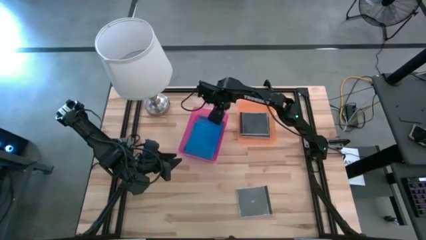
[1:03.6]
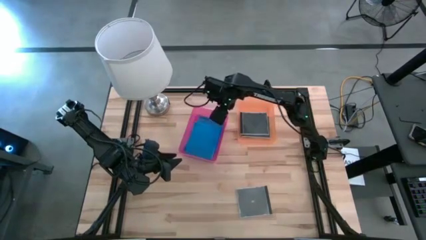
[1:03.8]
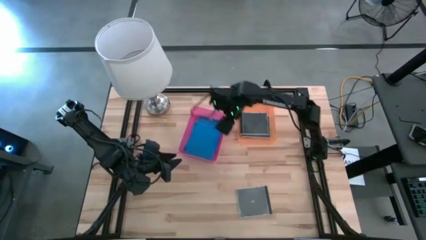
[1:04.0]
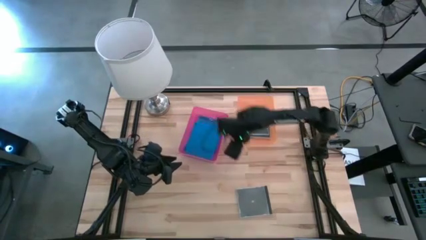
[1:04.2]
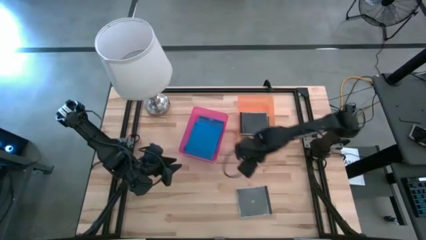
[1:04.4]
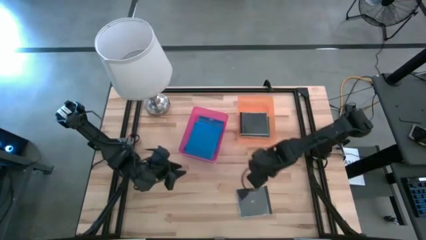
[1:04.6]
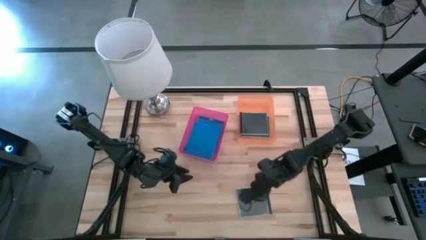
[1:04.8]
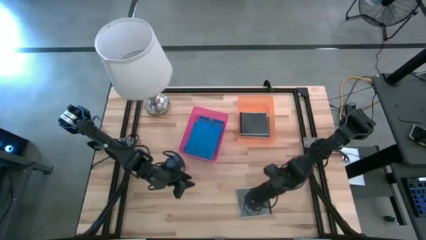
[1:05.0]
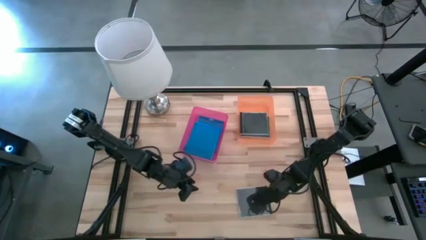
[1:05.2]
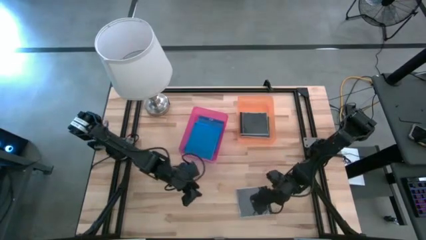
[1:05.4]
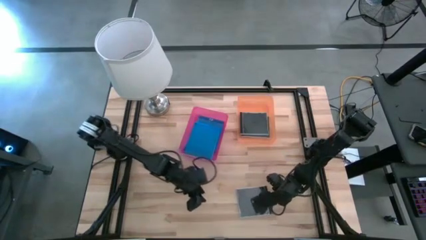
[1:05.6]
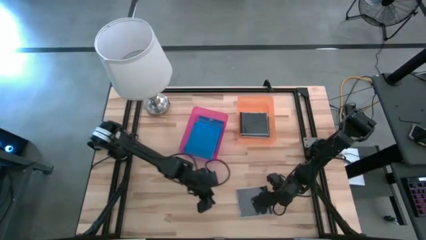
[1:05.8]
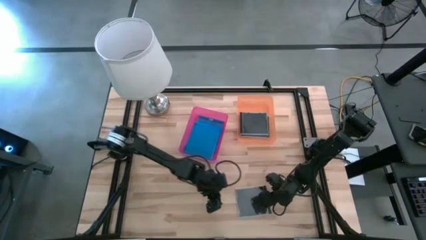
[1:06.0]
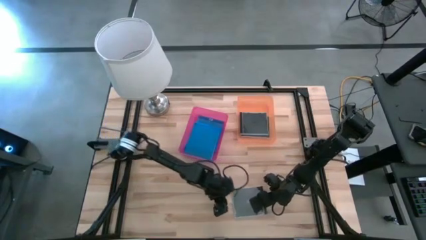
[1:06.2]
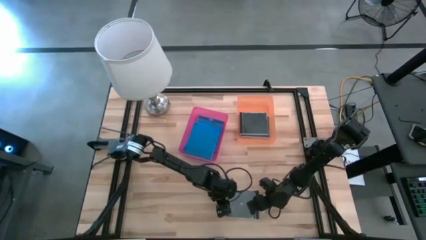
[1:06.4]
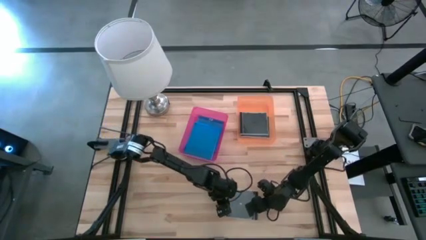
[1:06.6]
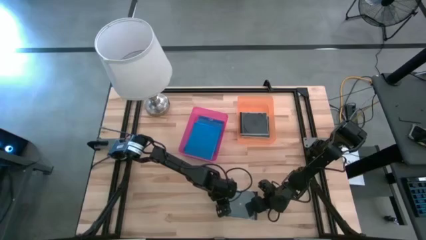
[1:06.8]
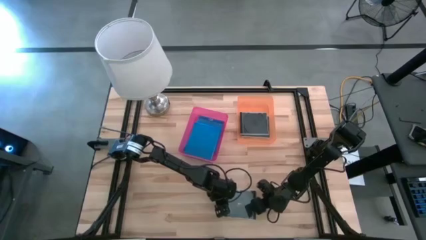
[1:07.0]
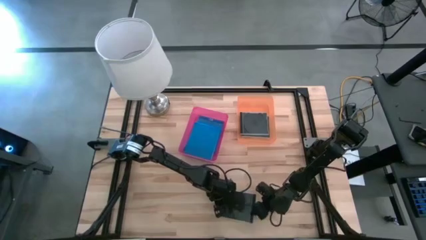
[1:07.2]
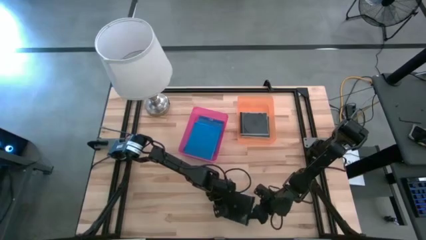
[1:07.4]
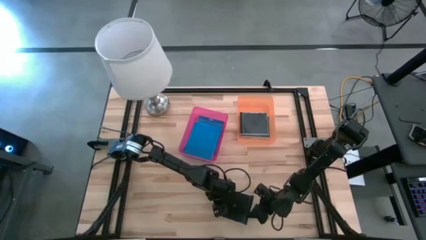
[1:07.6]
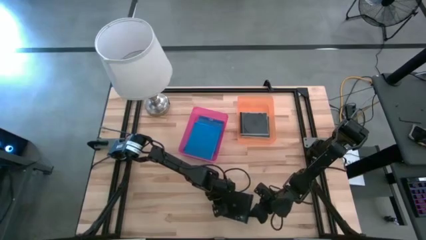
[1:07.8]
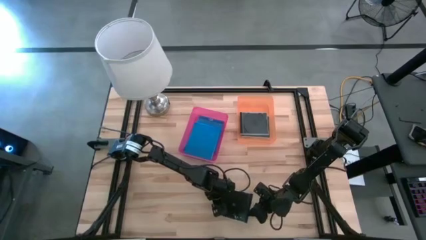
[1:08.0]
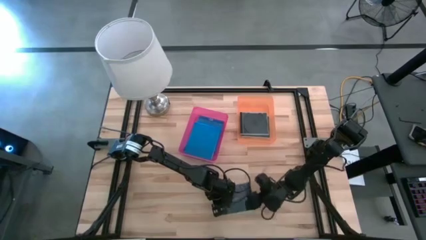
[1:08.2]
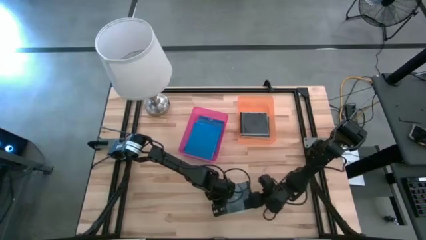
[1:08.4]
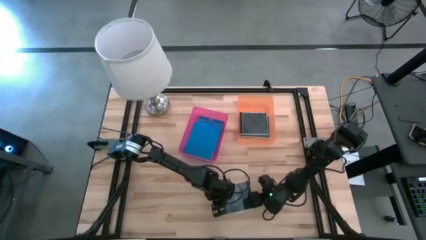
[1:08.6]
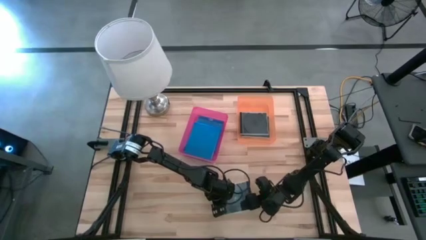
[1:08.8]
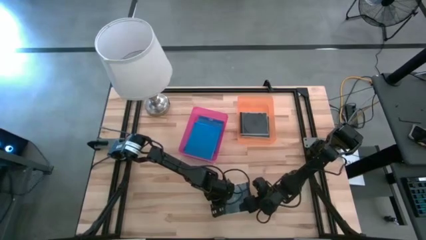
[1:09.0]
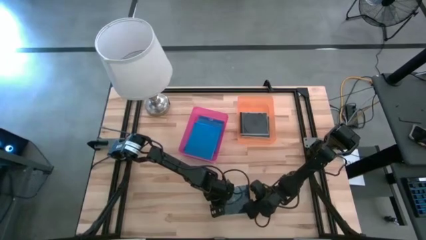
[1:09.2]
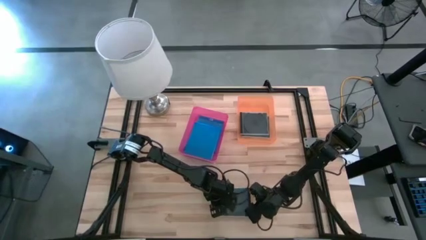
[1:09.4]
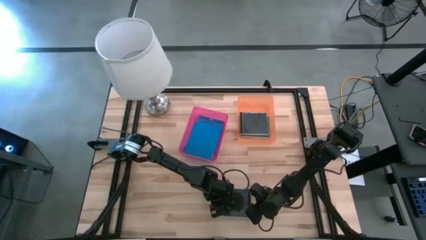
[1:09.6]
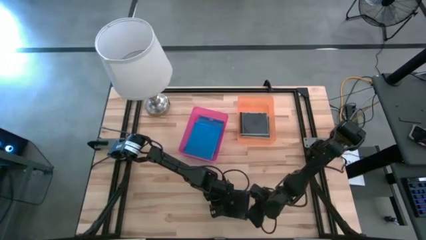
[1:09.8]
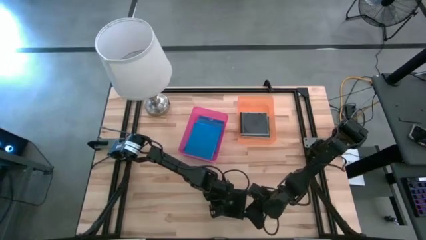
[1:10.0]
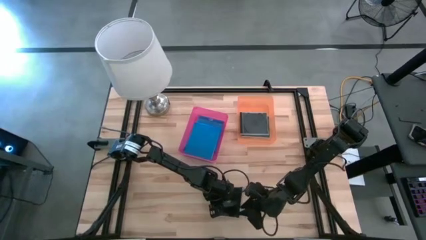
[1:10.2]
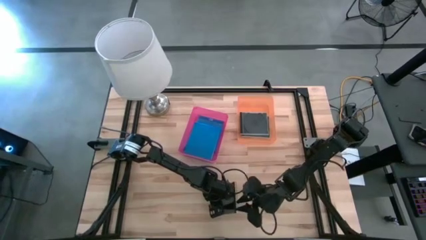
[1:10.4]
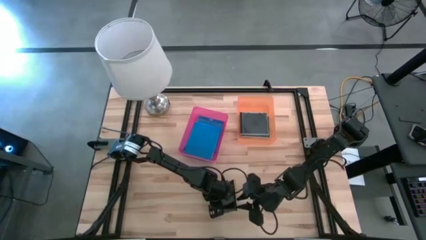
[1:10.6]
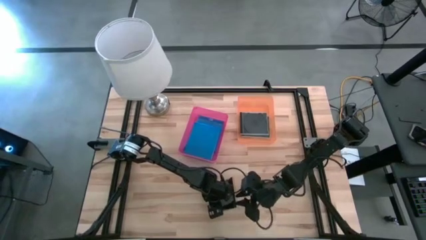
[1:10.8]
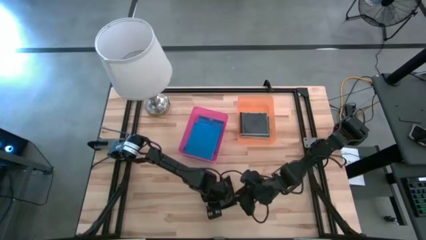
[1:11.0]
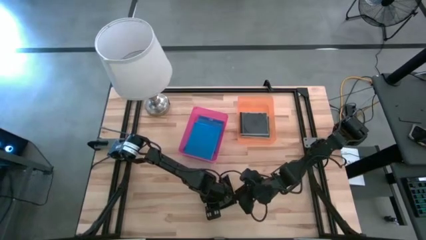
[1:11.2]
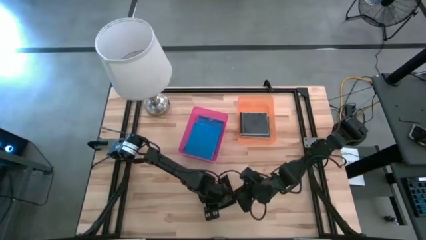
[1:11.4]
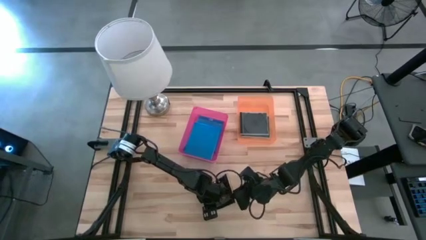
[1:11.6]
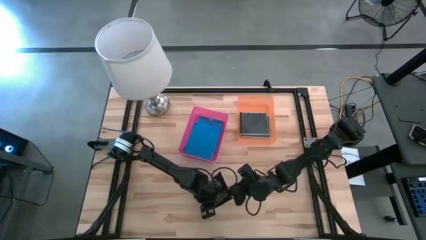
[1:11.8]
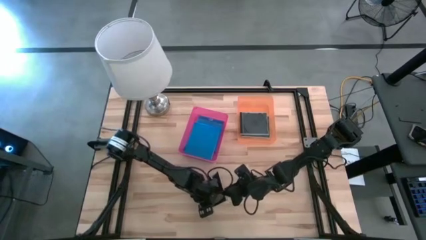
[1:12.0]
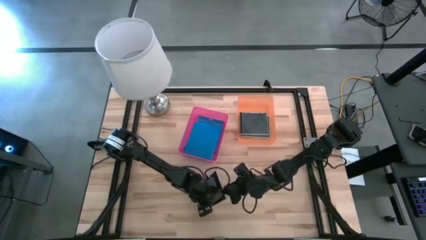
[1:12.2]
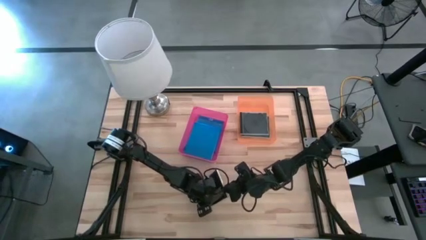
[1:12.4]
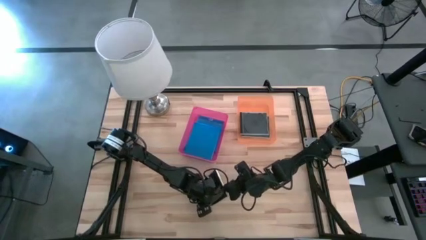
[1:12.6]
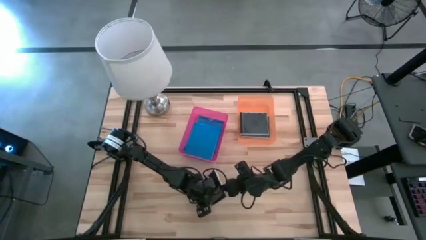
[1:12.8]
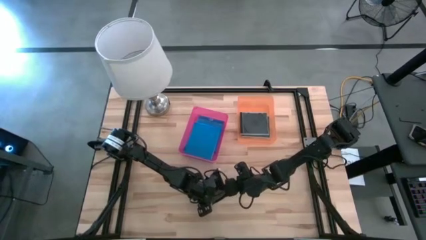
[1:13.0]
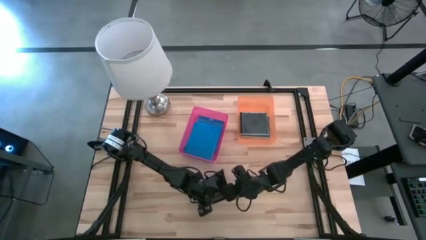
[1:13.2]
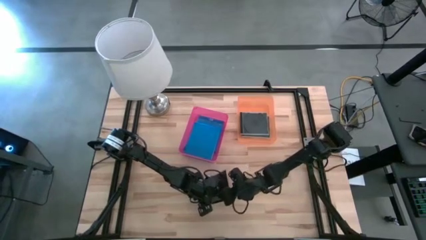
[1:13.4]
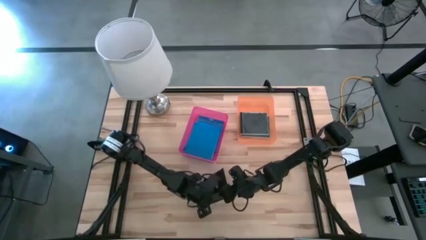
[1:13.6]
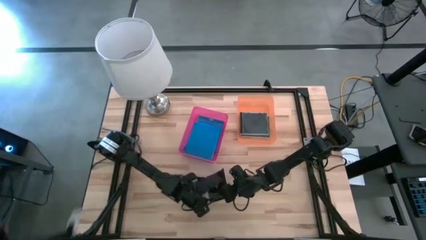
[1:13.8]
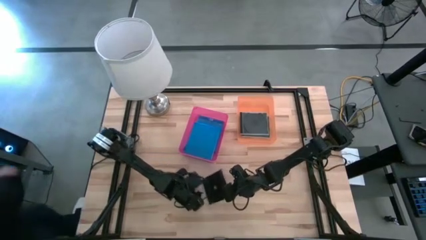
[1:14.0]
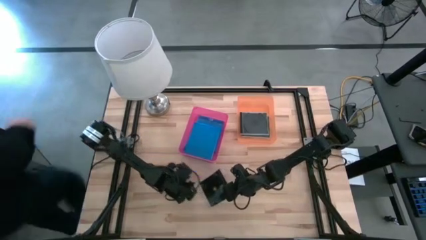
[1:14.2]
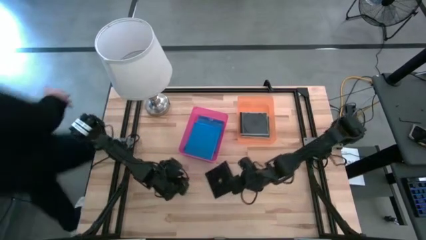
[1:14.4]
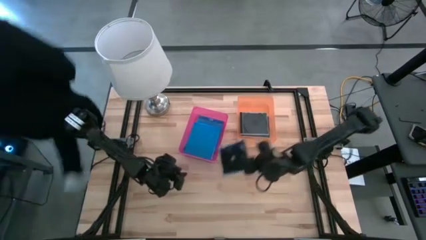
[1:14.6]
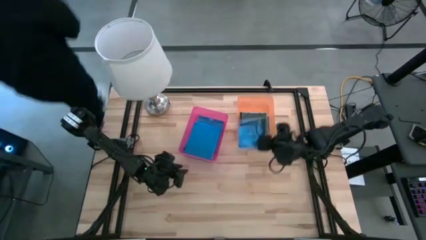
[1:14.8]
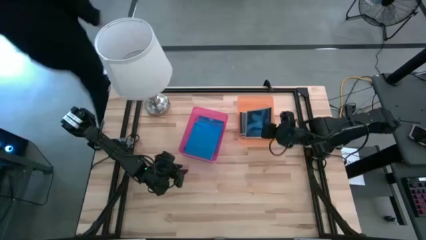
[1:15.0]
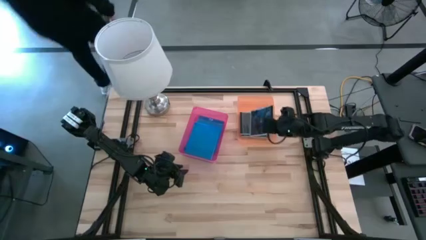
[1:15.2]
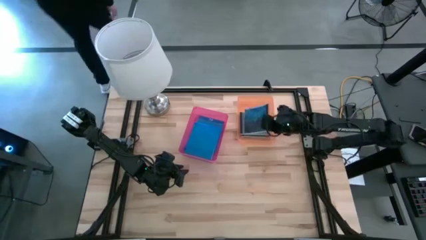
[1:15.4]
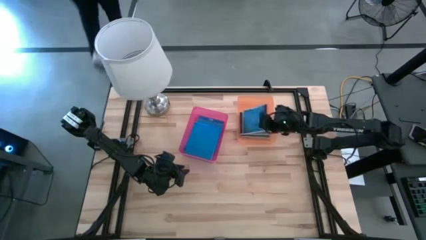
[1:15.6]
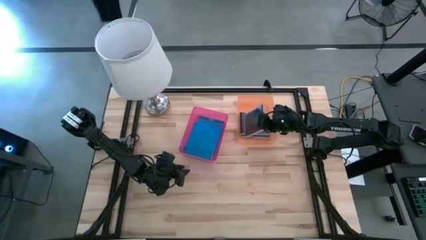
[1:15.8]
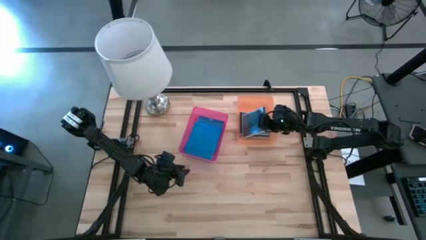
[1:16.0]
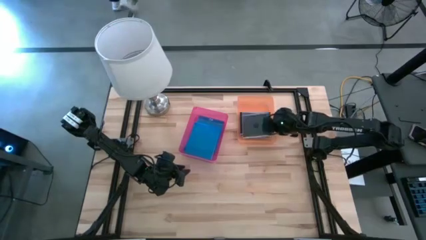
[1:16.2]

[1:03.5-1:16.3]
Task: Pick & place jewel cases by type
Put the black cd case into the orange bin

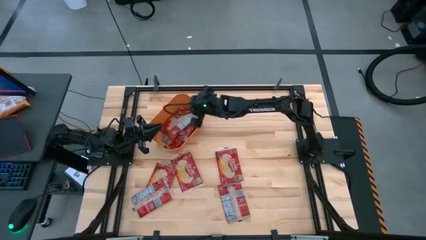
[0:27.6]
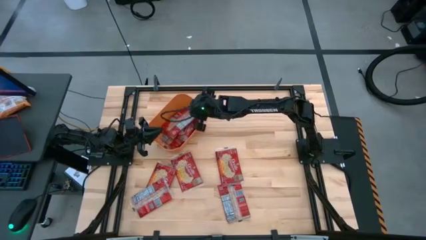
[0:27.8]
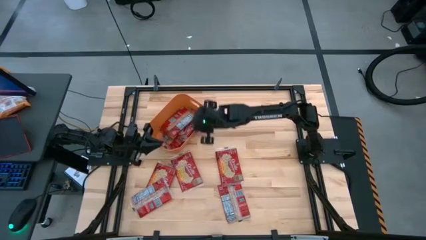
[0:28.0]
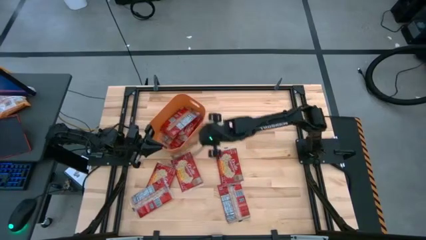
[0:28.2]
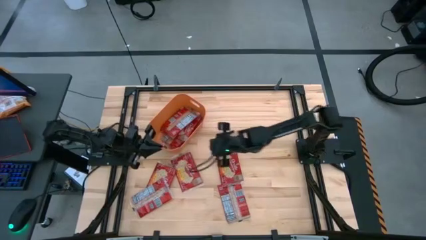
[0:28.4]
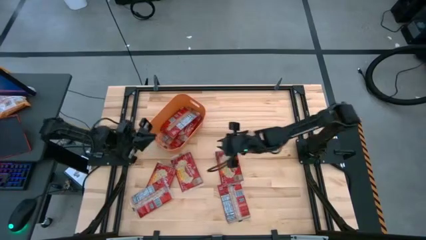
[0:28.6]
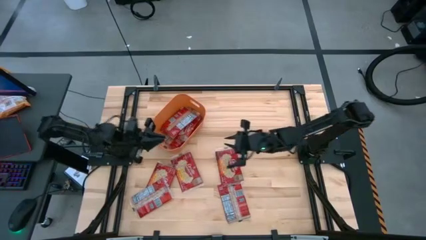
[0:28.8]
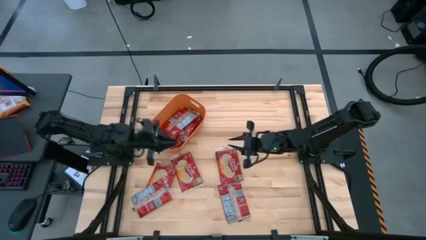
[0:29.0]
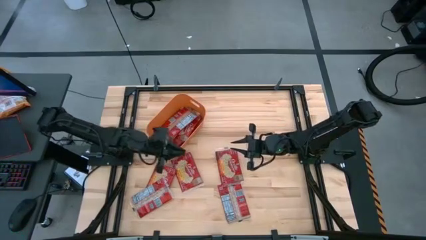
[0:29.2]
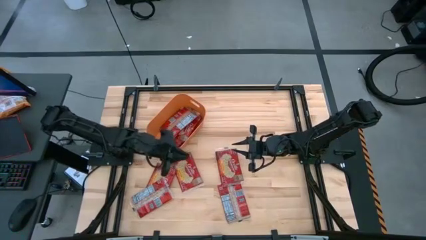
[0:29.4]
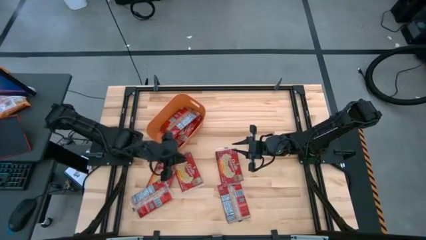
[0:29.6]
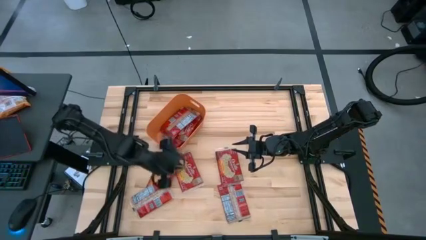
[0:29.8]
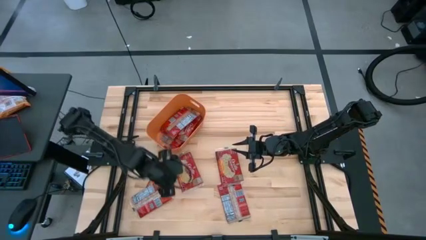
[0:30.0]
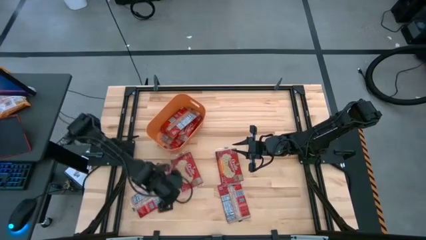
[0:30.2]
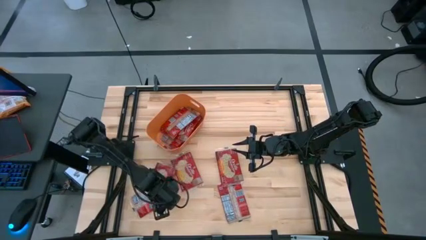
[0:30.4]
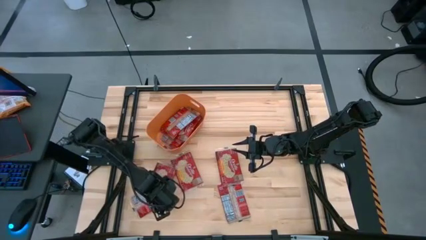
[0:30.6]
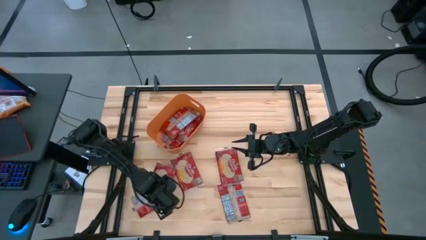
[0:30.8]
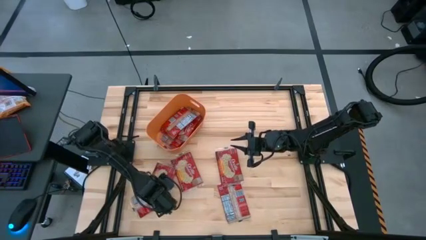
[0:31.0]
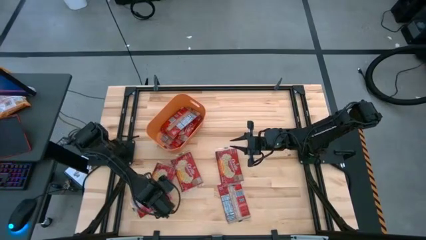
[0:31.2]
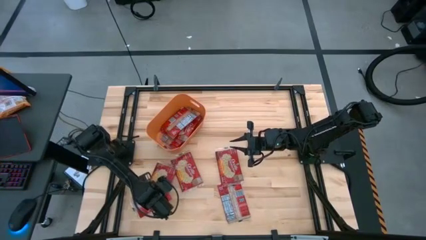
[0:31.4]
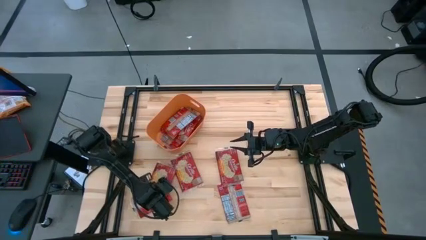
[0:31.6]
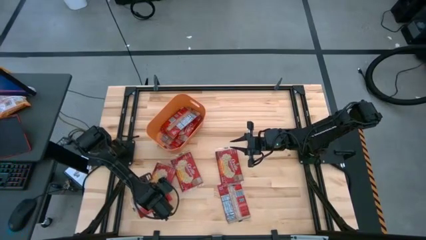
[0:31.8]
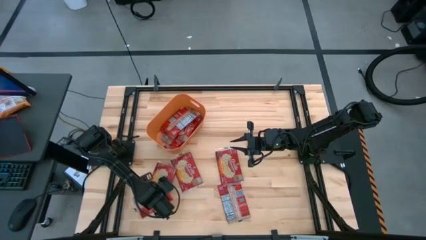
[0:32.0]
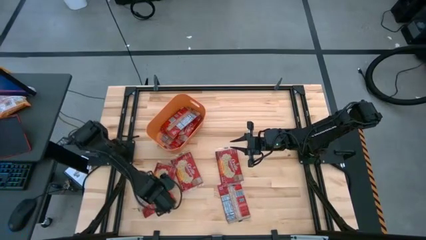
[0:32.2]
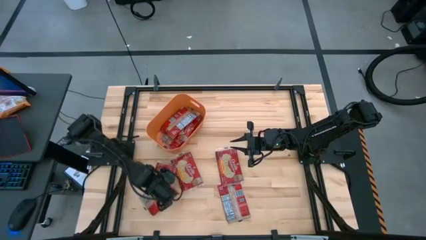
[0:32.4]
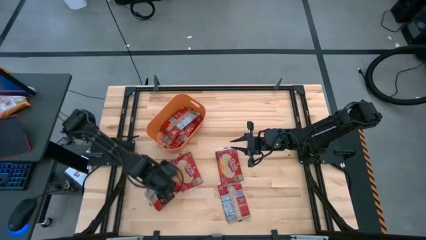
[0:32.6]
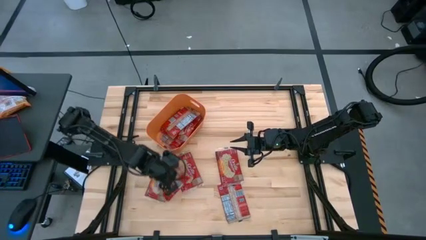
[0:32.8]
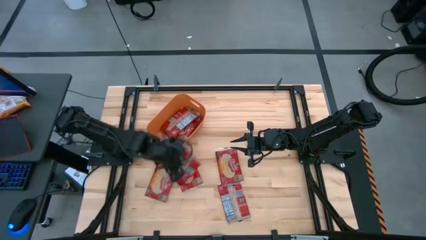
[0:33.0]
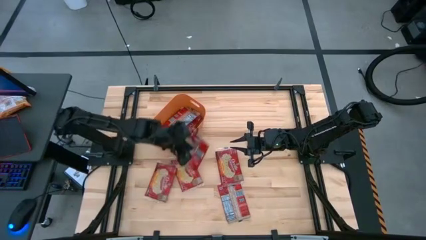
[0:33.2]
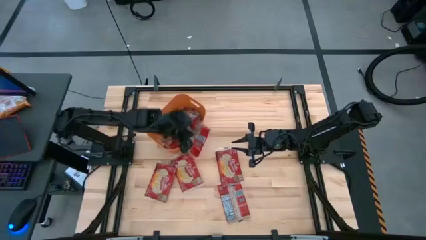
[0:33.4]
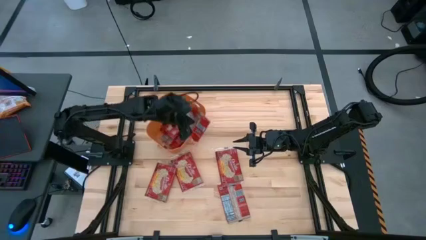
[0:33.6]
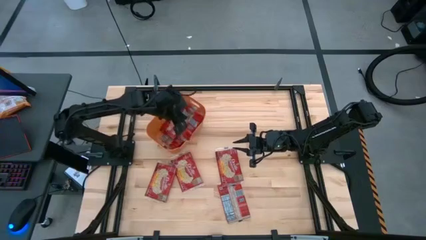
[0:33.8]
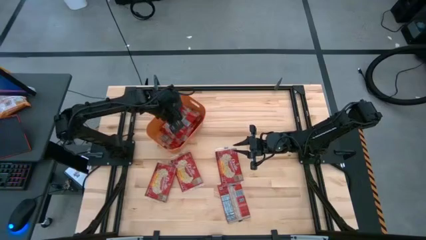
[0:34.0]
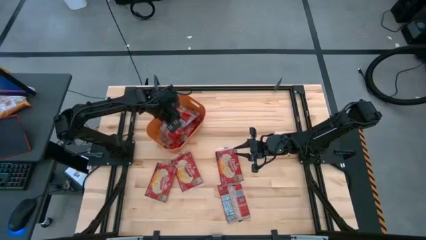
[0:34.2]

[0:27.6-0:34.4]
Task: Sort popcorn bags into baskets
Put the red popcorn bag into the orange bin
